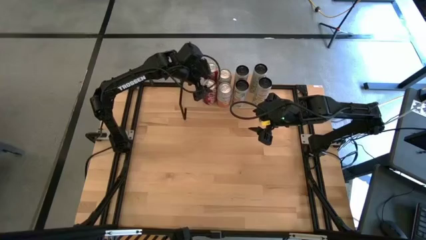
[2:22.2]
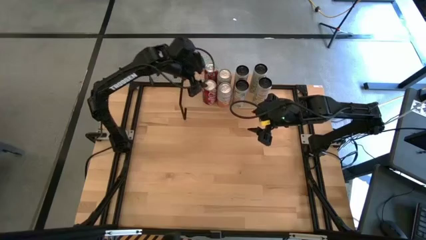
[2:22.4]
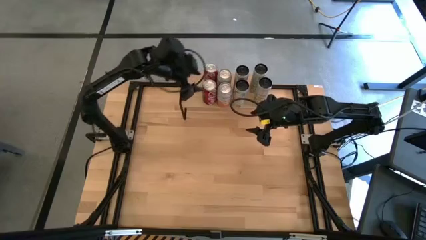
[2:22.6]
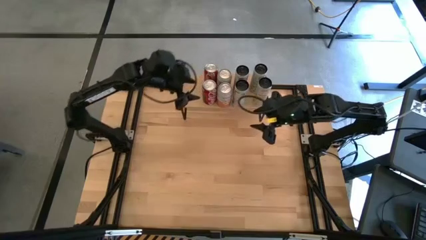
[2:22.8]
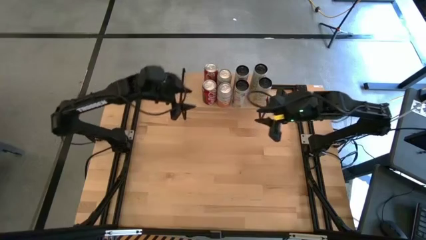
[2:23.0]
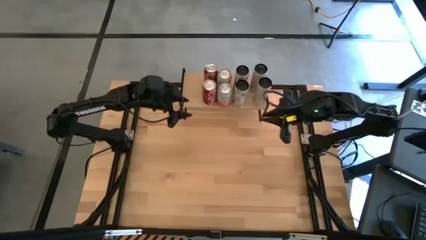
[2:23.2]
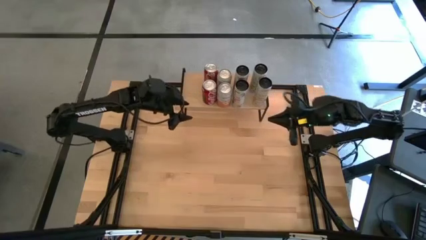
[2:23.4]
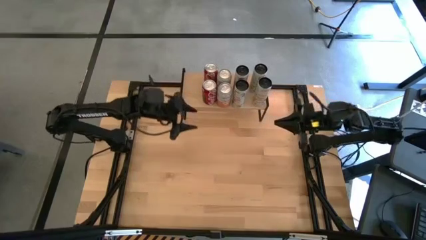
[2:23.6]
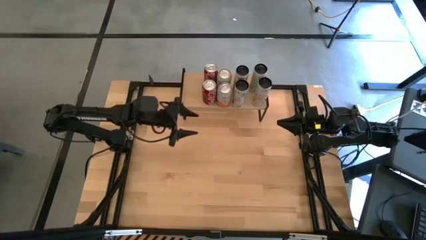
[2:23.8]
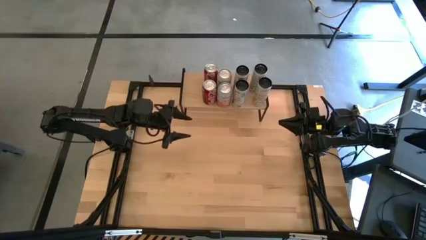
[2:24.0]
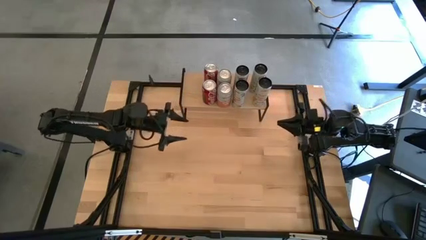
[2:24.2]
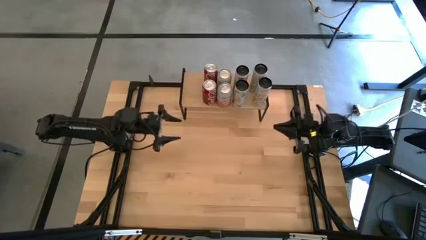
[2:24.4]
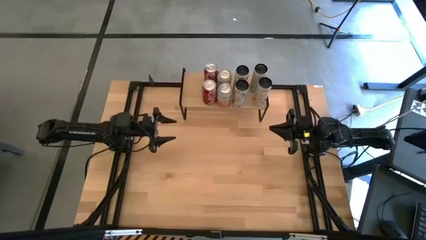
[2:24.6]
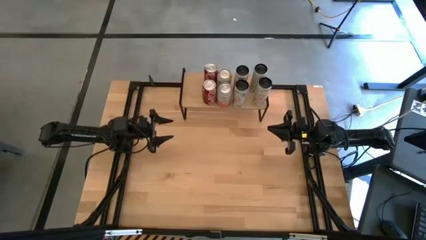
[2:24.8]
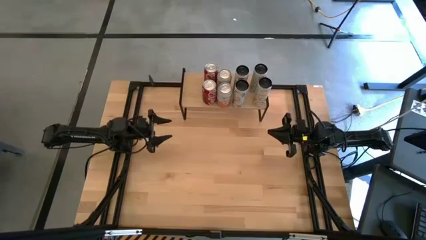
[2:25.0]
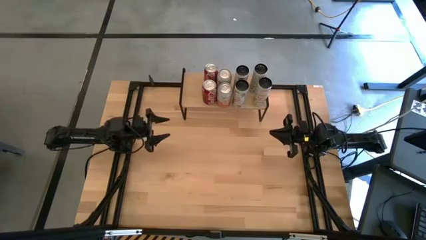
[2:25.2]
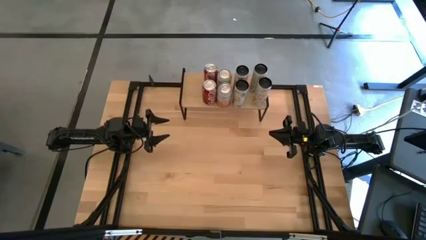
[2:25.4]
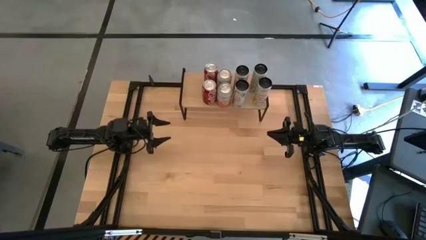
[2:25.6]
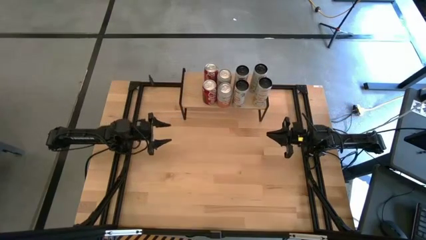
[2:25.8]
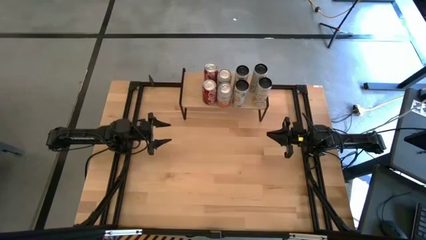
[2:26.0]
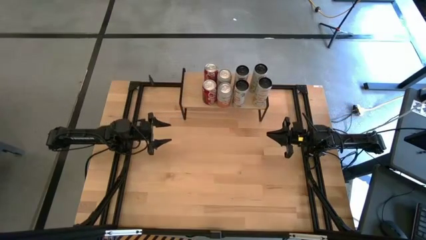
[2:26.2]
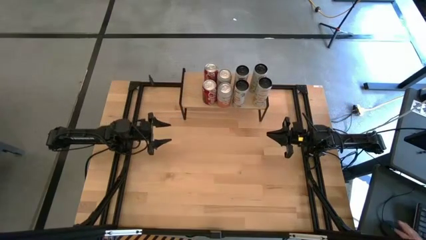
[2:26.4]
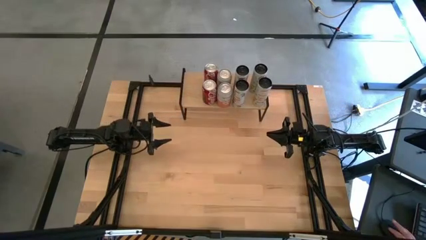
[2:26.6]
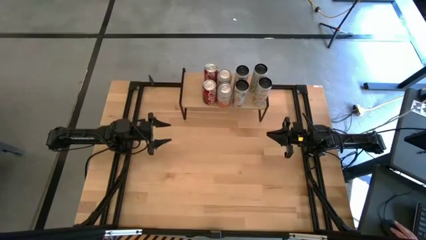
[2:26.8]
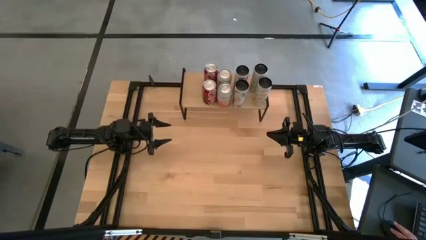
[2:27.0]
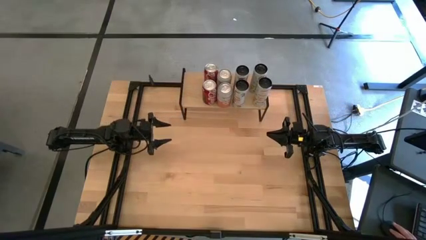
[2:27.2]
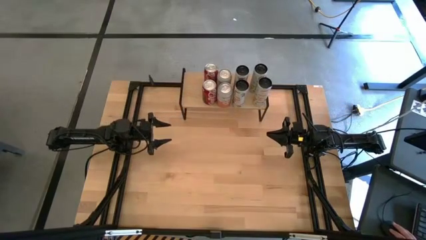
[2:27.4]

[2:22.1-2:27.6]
Task: Place canned beverage on shelf
Return to Home Position

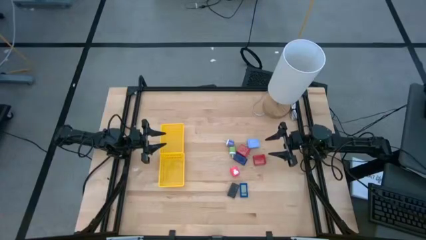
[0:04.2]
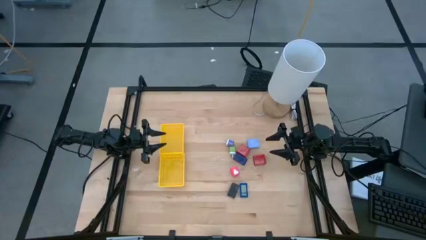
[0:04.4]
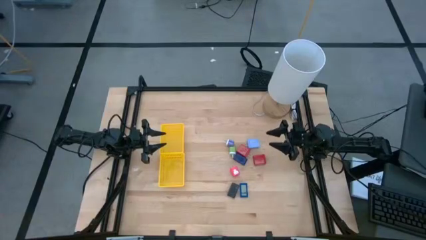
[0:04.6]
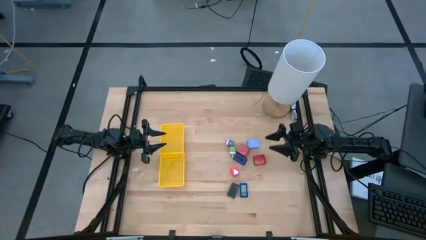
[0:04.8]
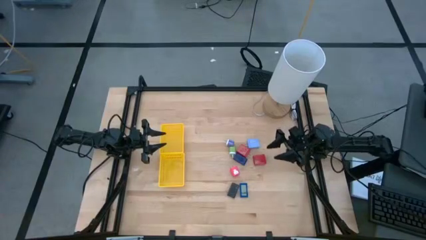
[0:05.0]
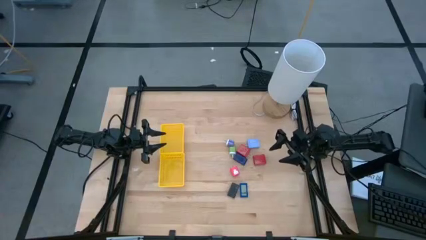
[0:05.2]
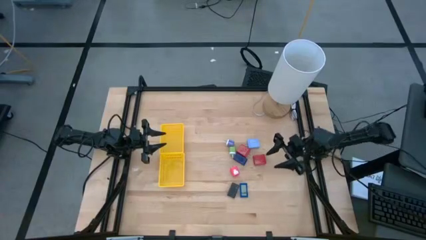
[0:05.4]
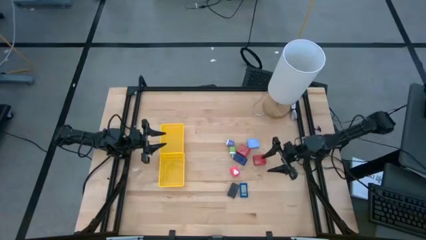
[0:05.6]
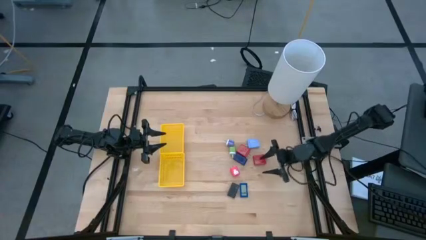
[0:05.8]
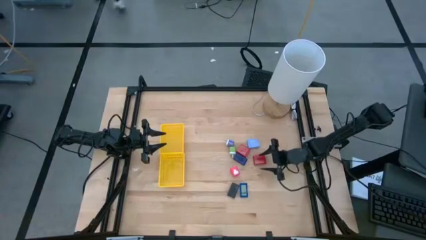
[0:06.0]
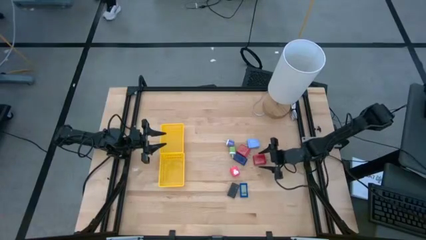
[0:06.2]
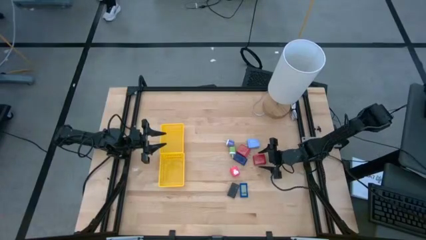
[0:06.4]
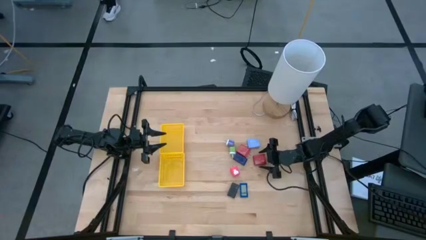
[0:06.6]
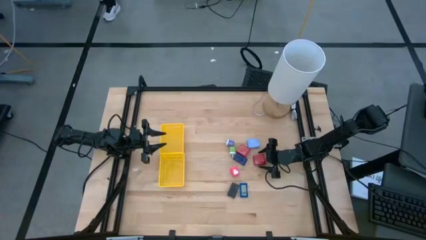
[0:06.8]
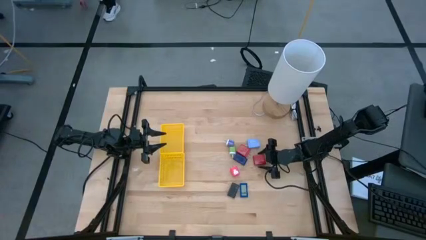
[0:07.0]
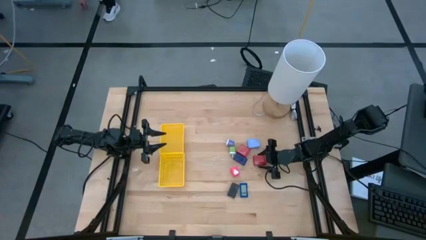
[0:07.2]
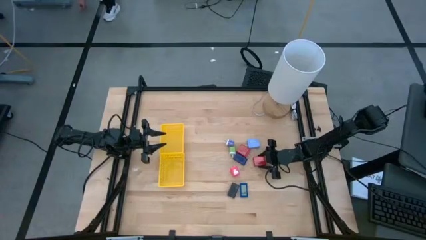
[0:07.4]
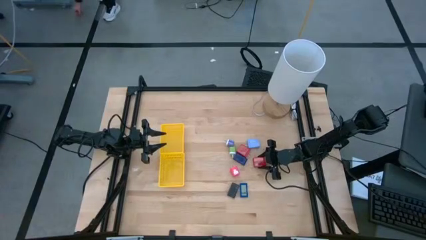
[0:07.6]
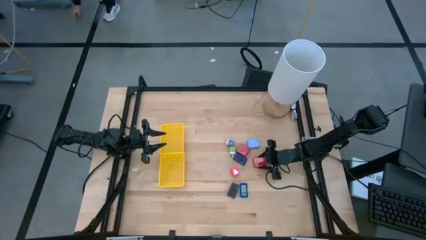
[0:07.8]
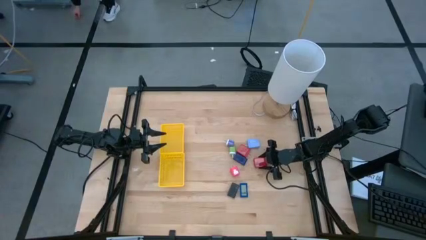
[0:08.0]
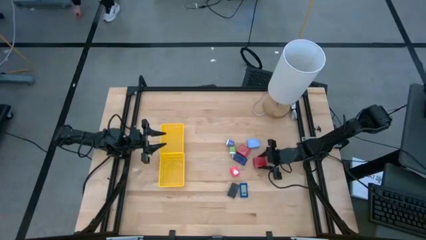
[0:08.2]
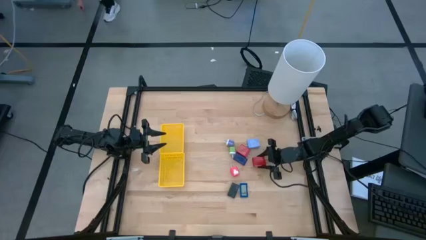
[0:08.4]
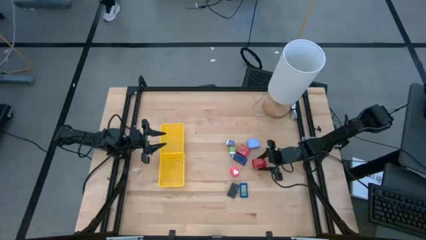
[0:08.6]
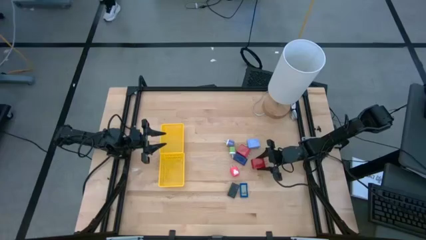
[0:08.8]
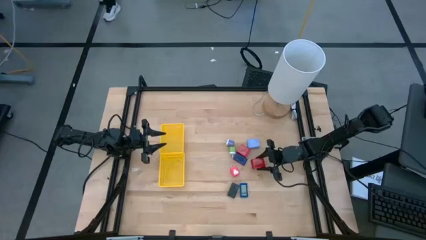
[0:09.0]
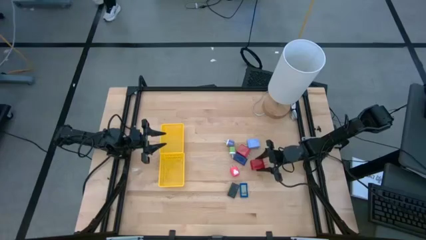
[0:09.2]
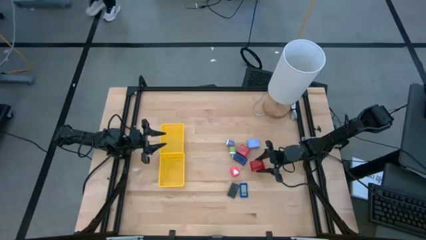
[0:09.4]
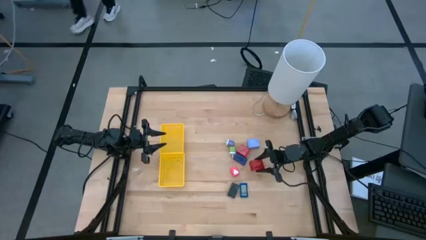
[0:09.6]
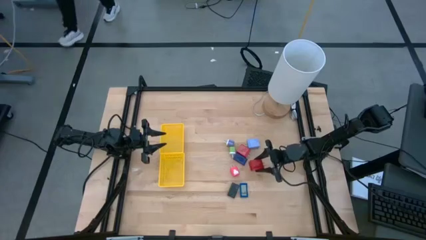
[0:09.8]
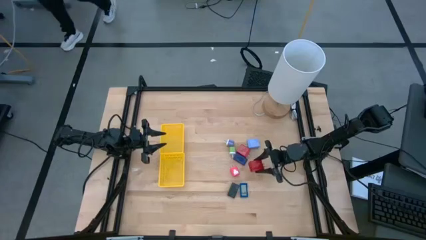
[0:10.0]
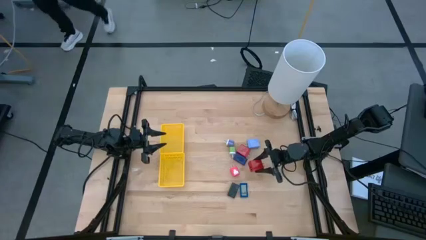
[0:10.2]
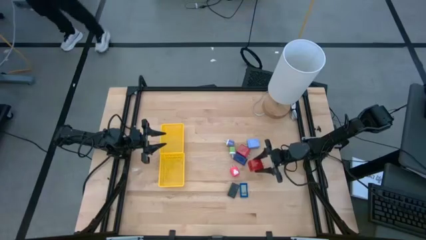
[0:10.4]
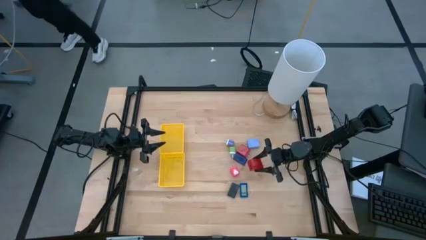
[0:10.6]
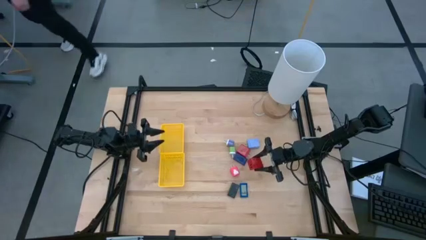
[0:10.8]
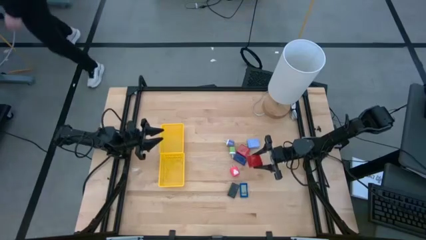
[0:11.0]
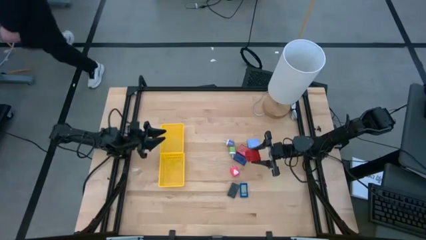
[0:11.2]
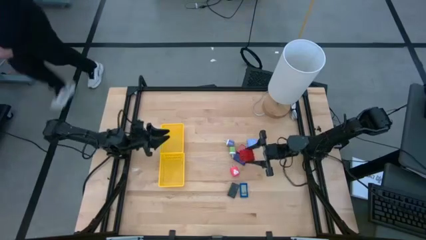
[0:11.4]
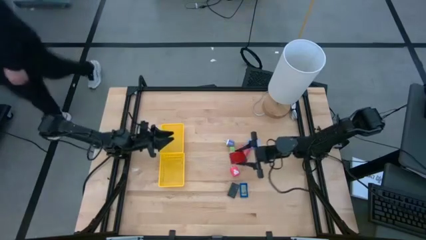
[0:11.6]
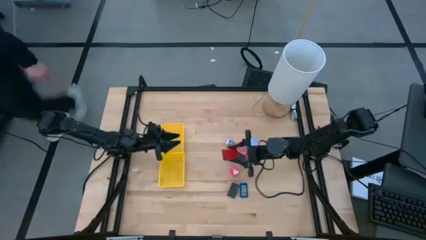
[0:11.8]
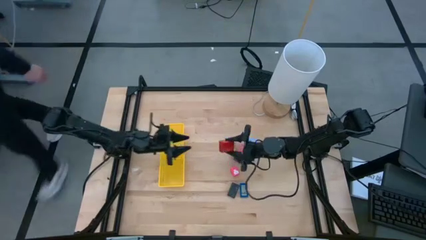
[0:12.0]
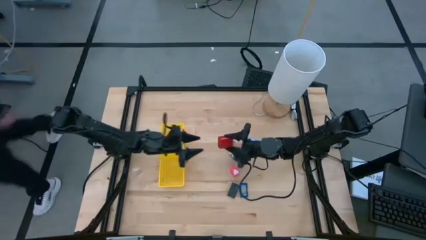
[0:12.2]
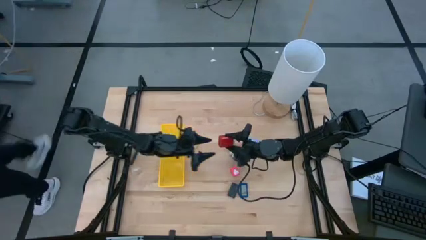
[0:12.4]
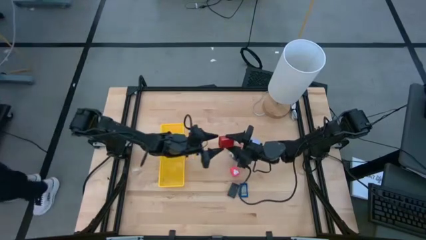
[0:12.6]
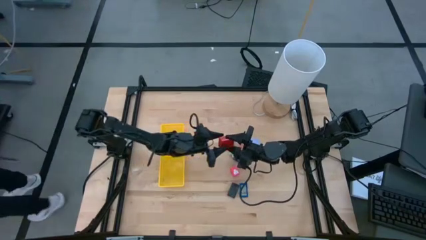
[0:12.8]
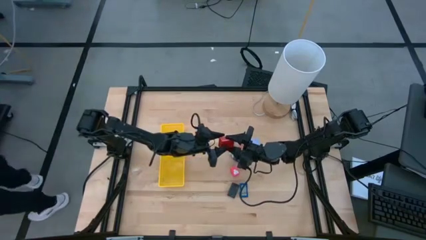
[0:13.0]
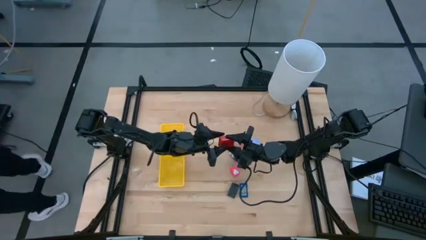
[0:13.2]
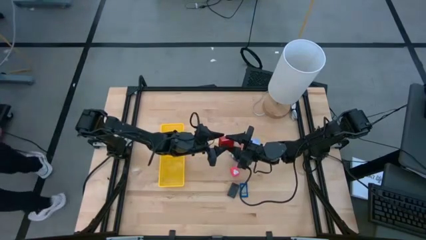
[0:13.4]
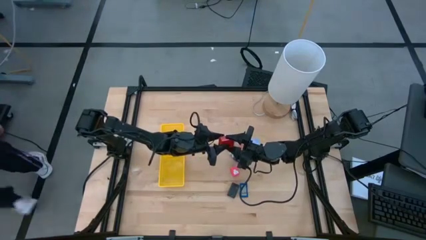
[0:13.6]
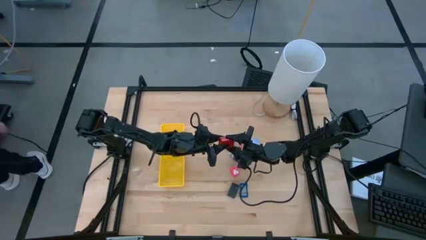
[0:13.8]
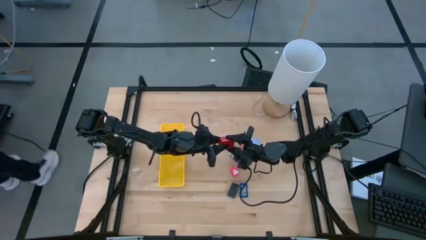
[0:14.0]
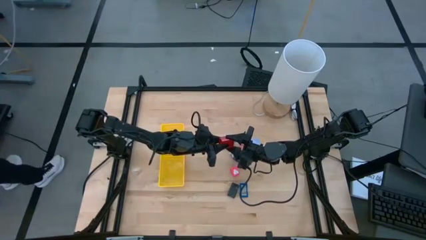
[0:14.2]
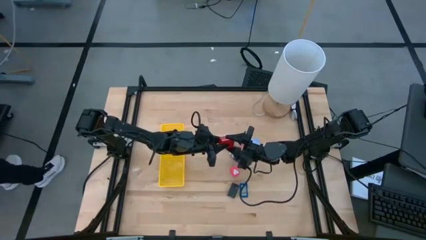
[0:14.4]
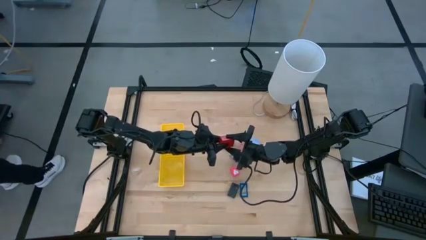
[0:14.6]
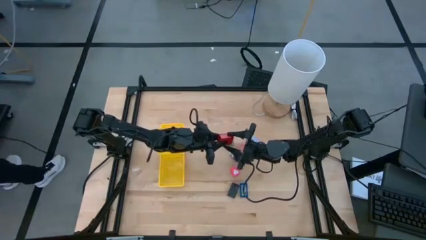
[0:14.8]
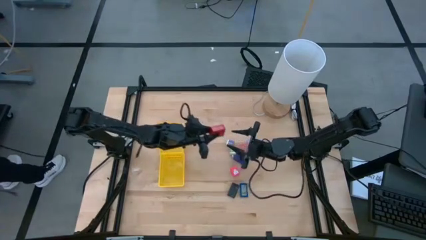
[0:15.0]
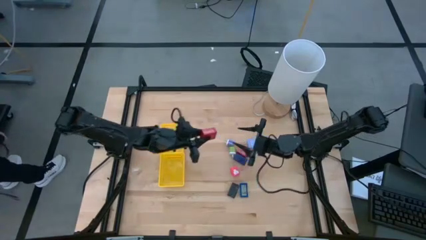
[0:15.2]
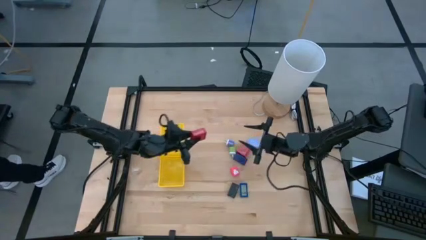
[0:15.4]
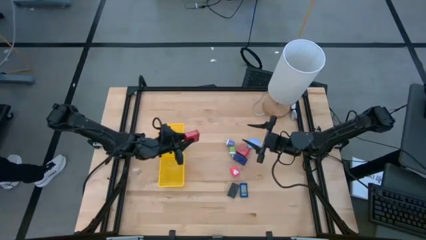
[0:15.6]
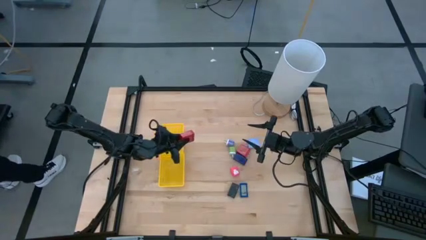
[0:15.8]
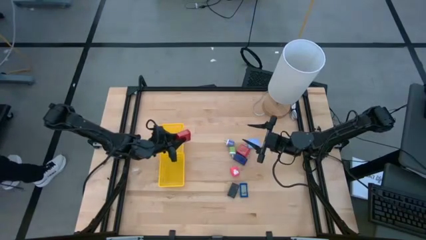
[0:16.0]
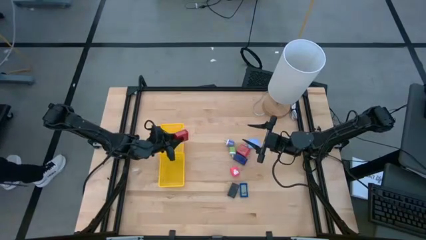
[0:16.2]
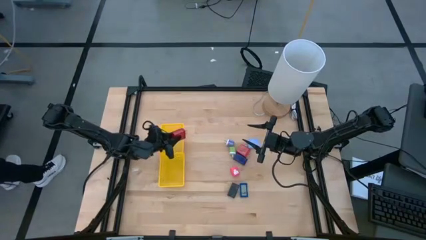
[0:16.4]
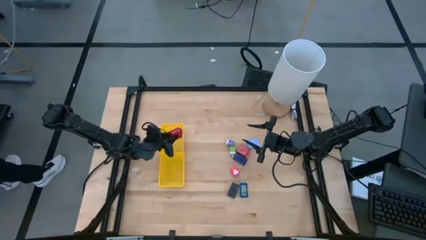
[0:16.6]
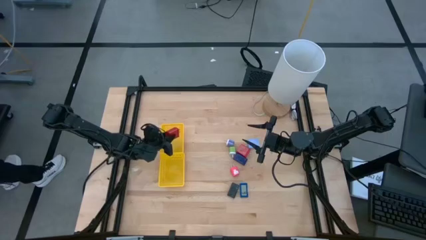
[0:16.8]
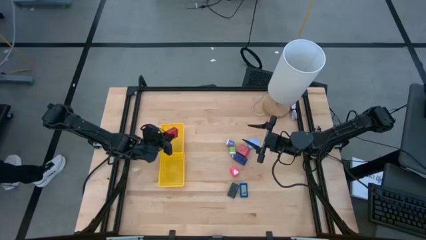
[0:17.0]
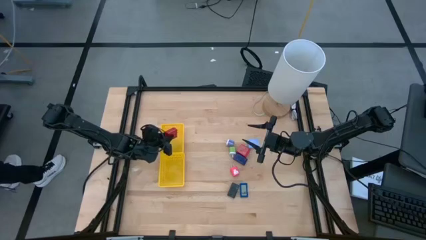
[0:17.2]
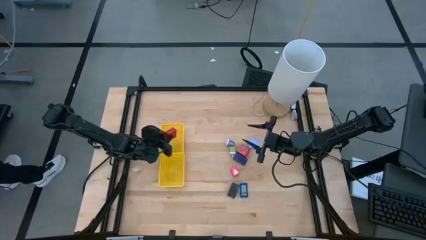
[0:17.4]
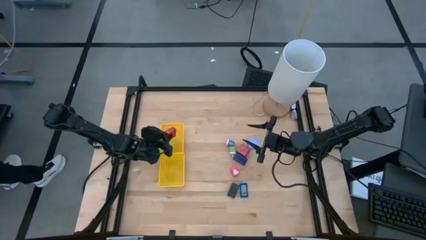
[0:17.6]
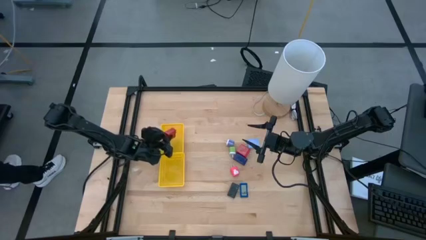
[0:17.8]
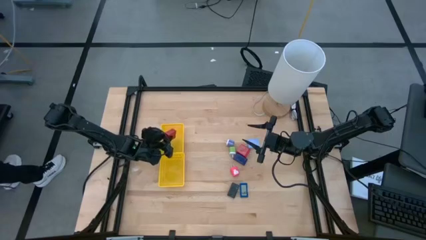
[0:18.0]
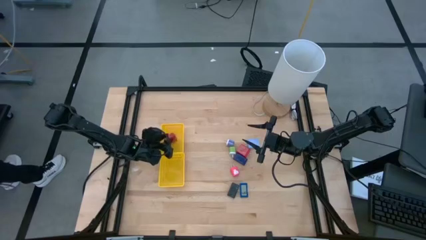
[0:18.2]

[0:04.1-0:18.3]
Task: Pick & Place Office items
Put the bottom red charger adapter into the top yellow bin
